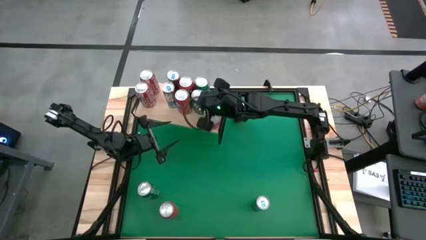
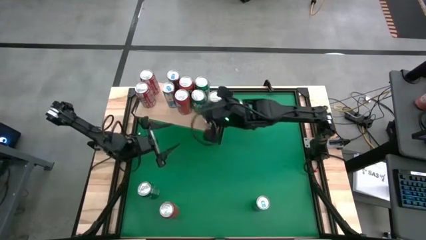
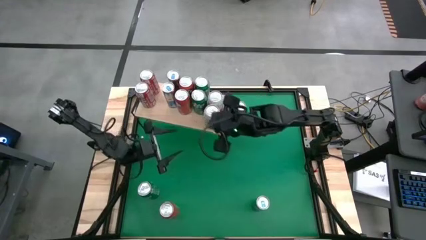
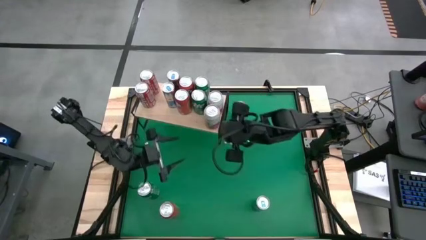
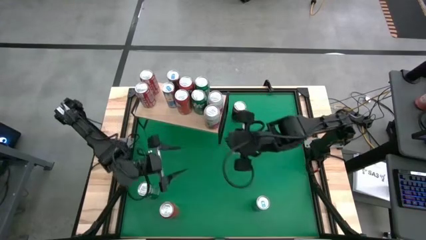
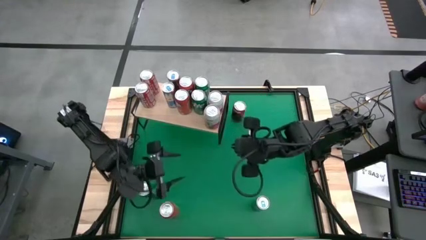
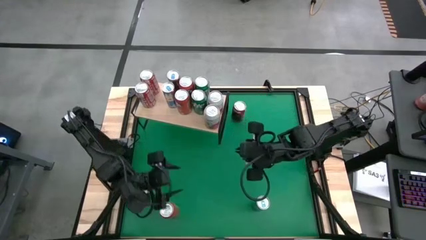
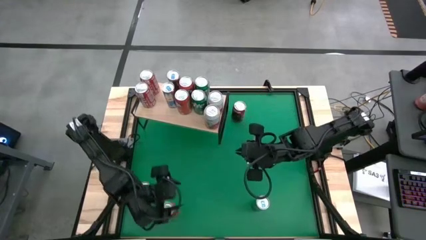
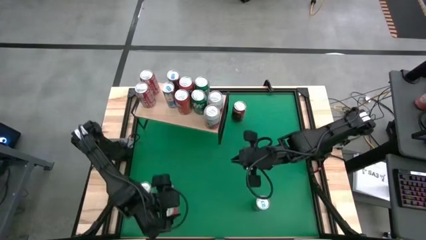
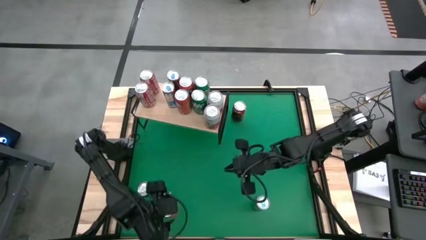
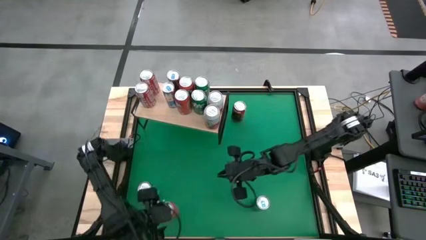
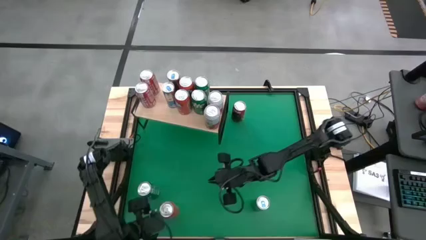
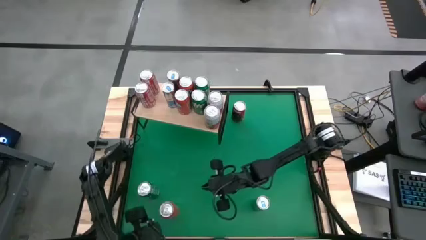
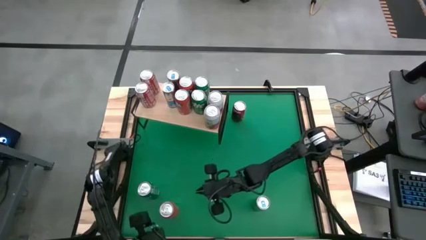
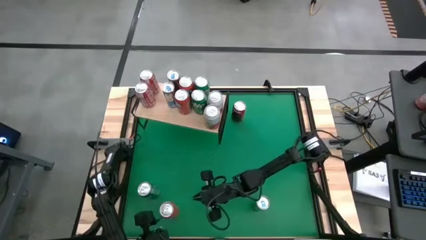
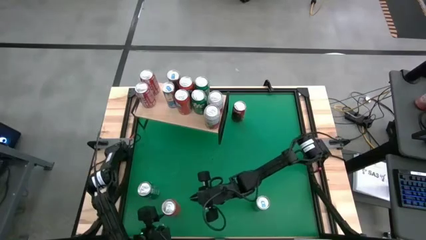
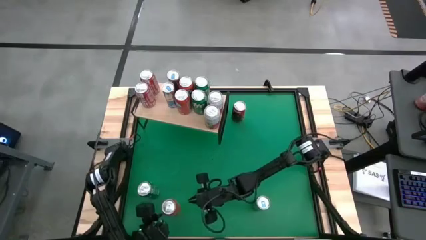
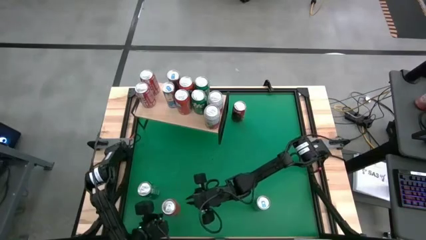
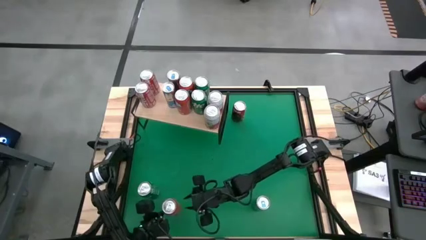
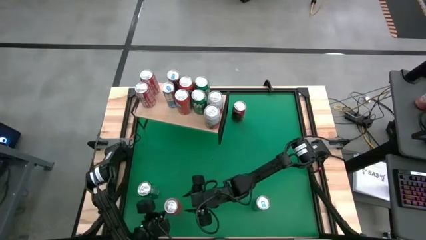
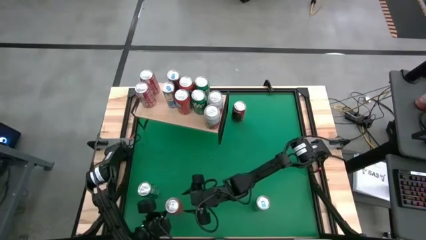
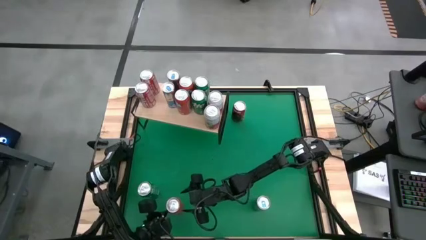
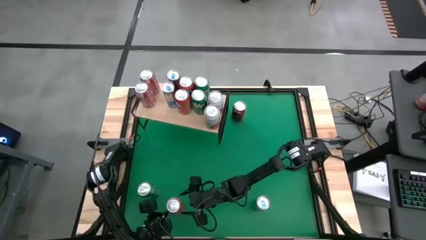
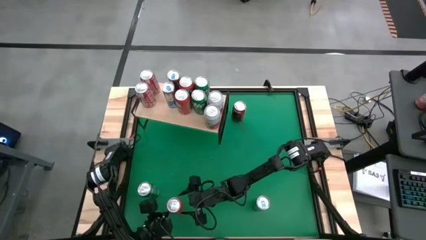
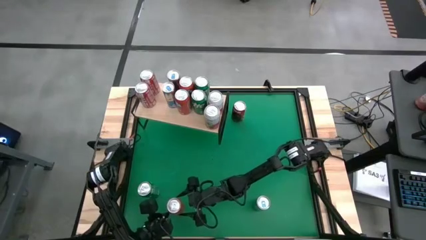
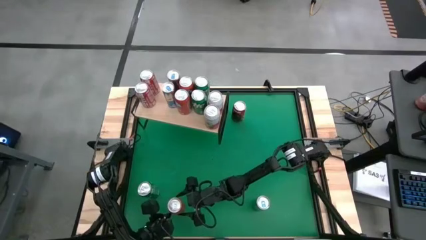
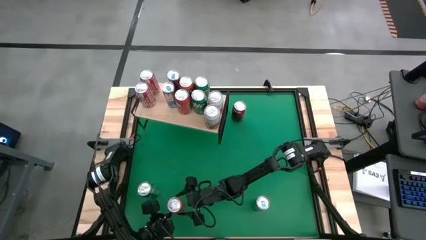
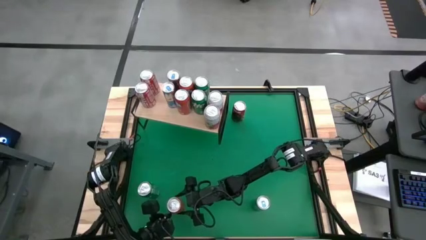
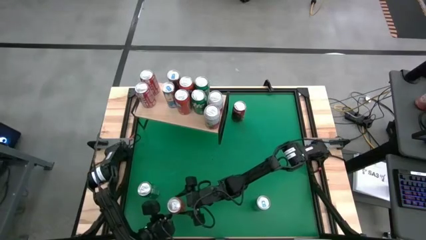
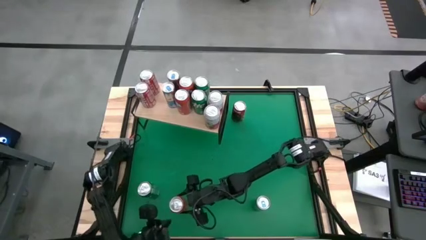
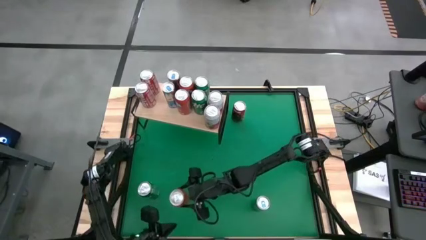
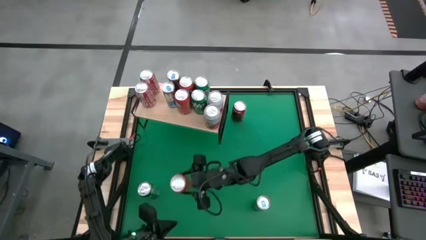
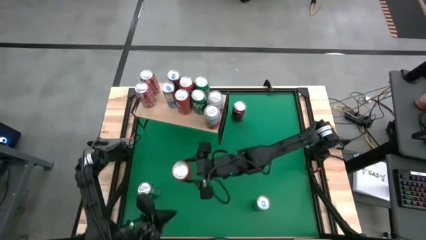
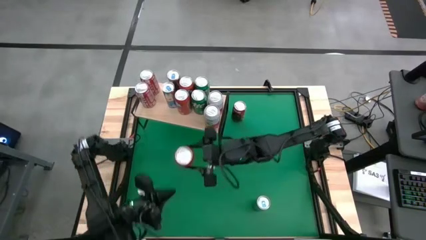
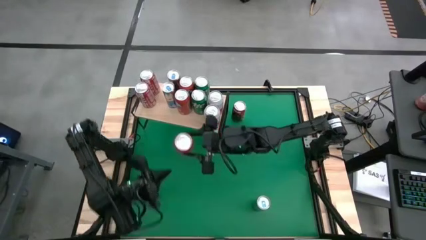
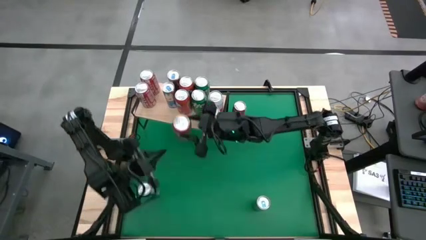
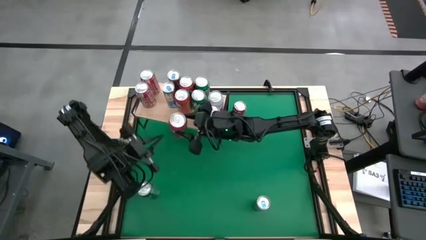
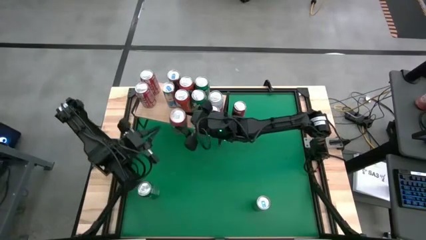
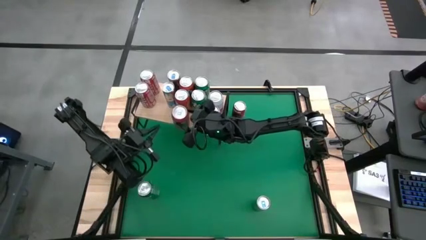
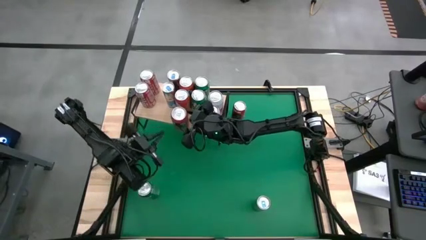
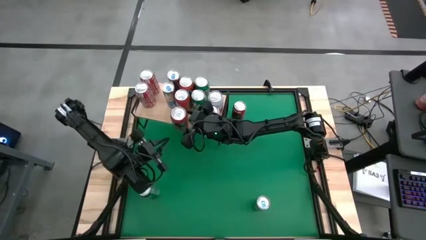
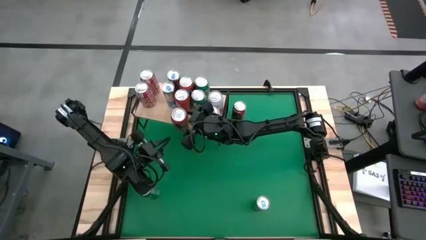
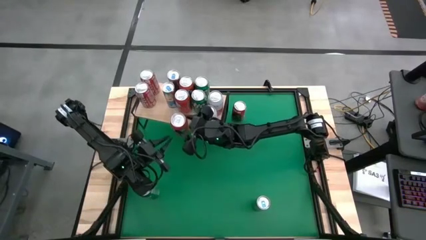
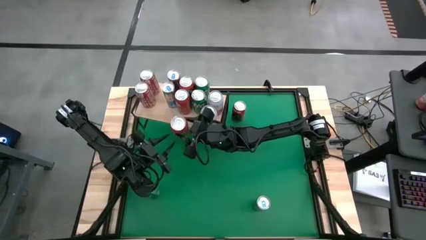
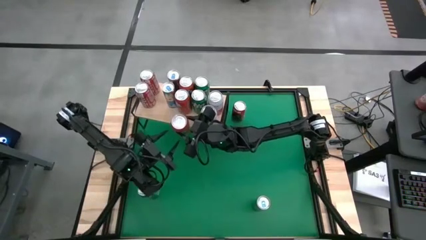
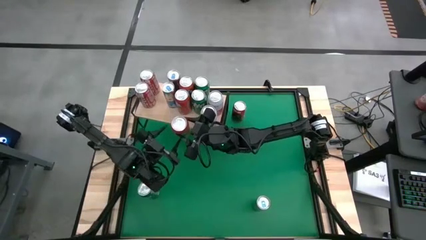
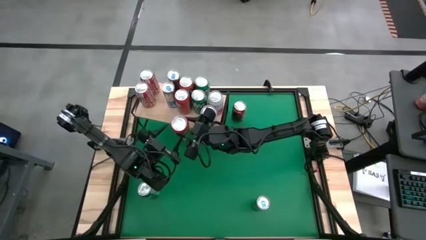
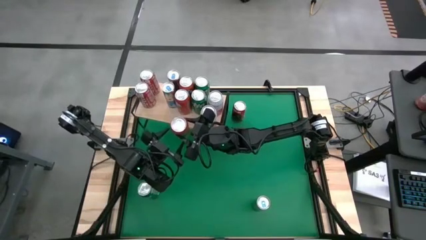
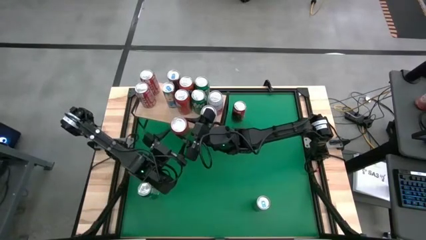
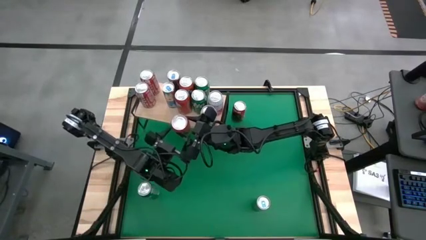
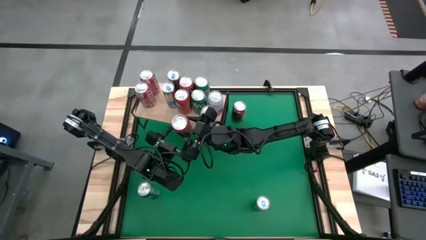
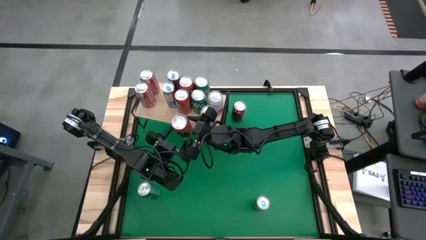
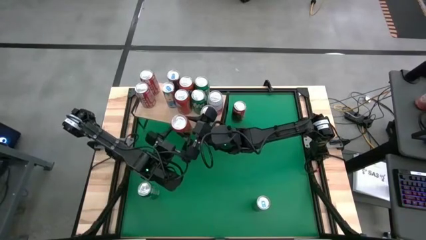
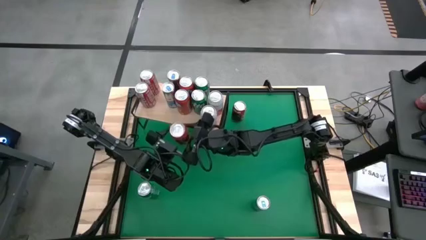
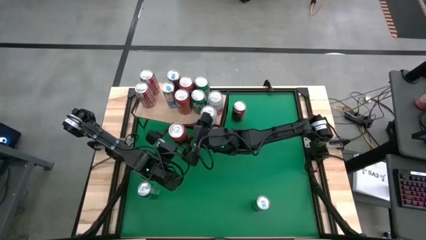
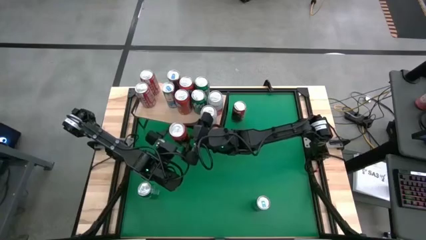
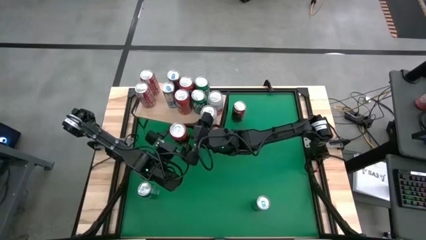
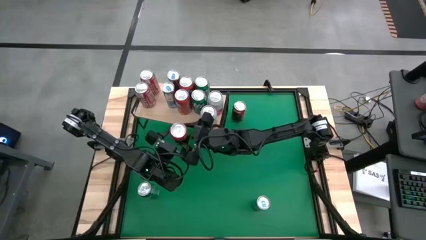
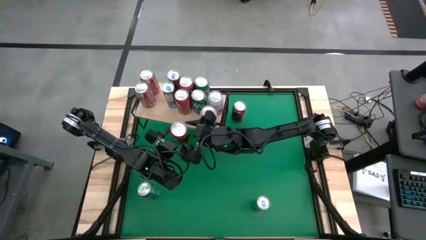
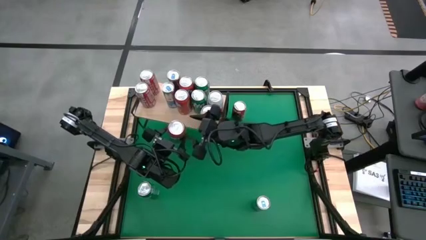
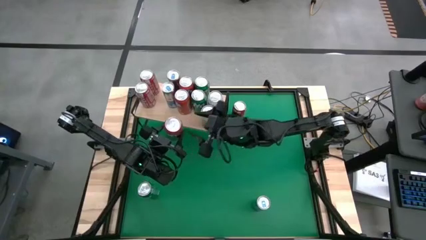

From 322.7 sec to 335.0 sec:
Task: Place canned beverage on shelf
Put the red soda can on the shelf aligned with the other red soda can

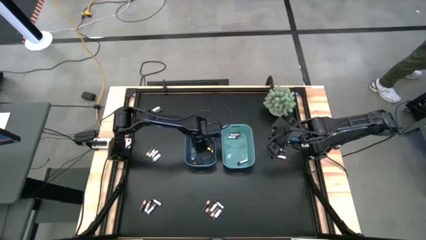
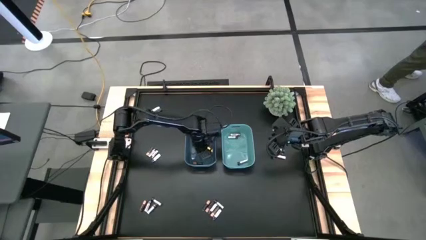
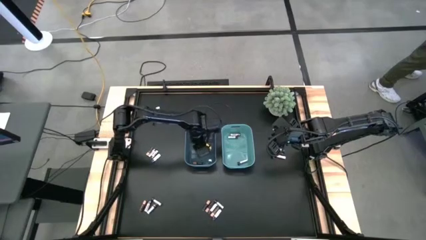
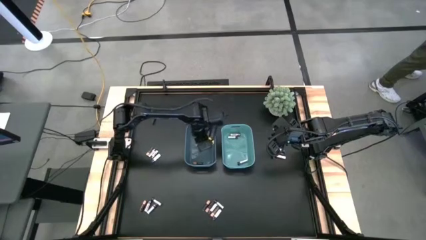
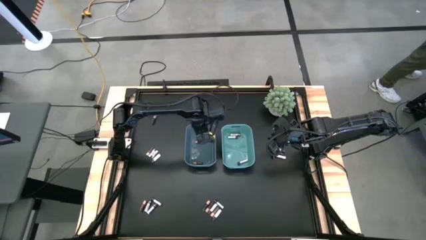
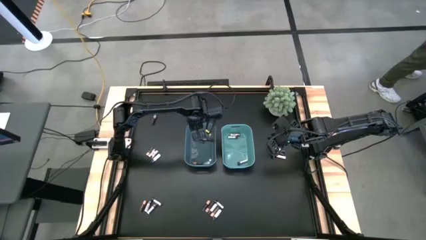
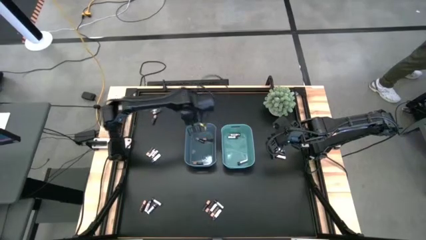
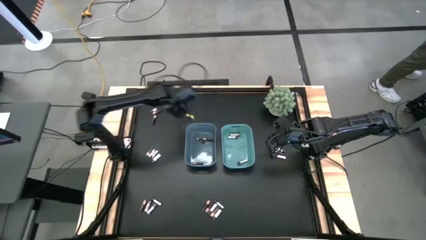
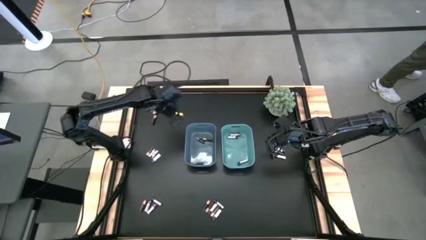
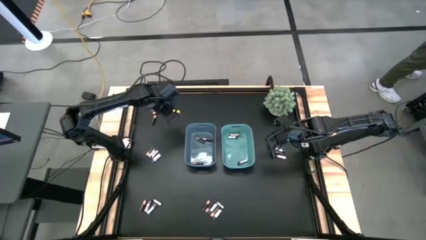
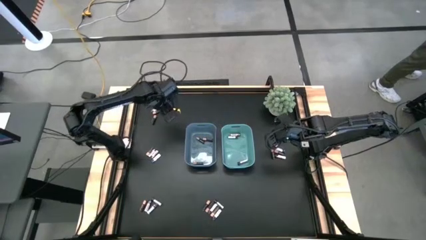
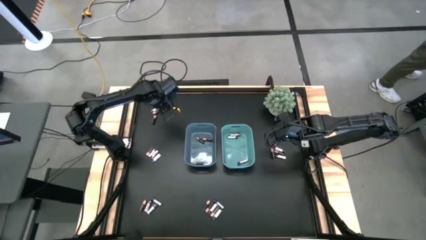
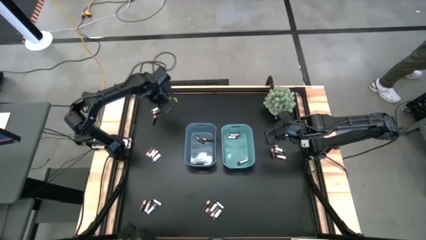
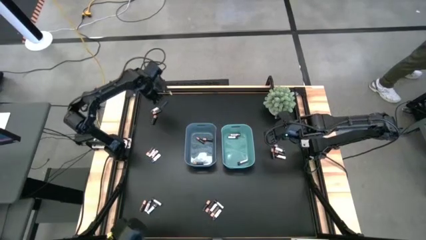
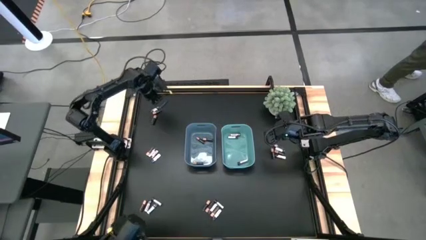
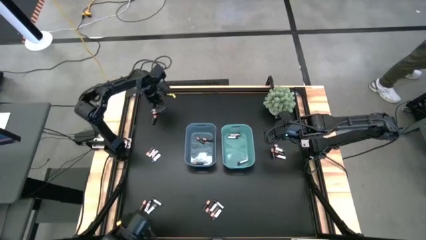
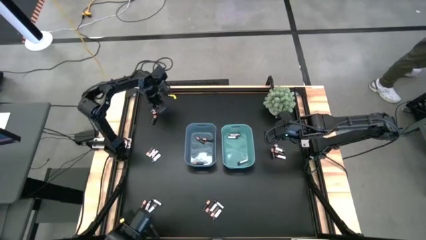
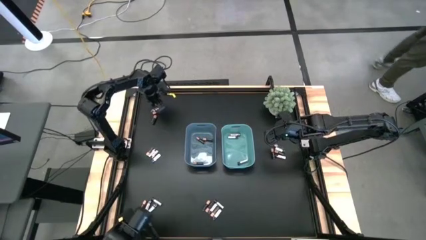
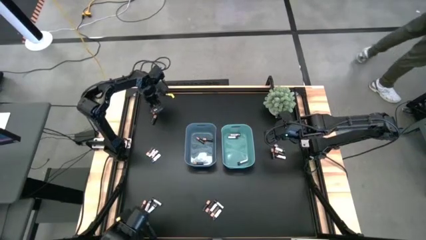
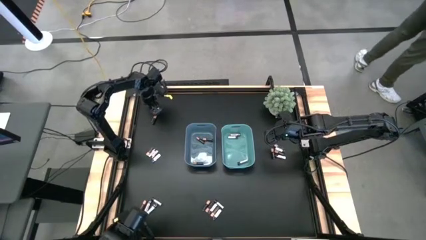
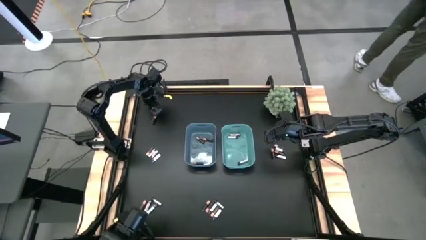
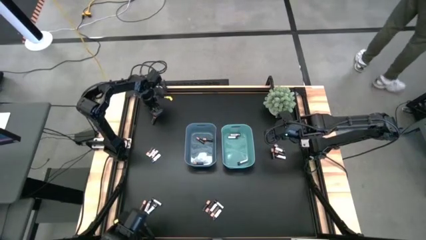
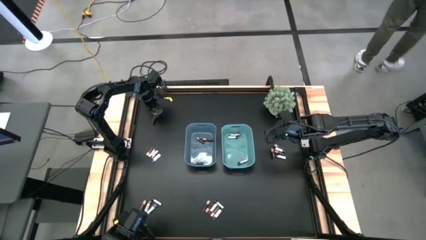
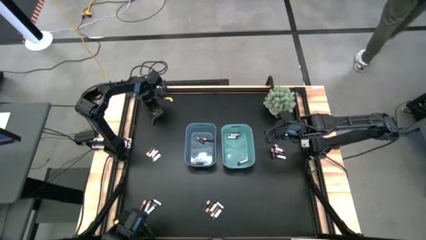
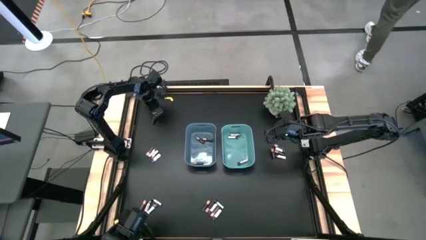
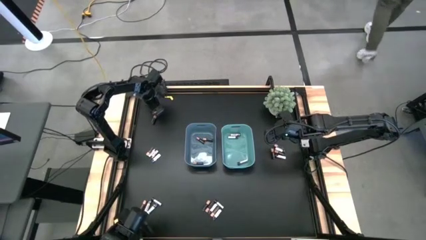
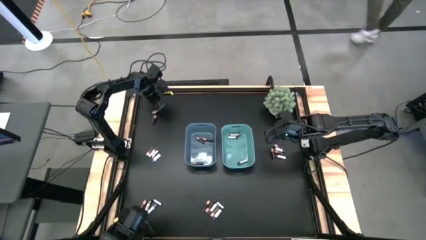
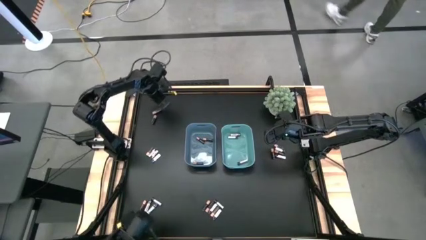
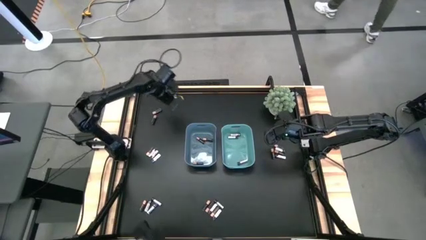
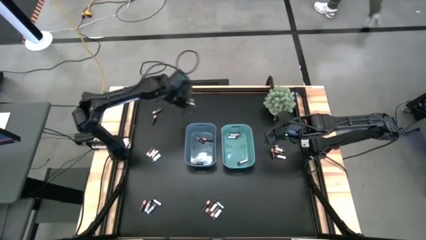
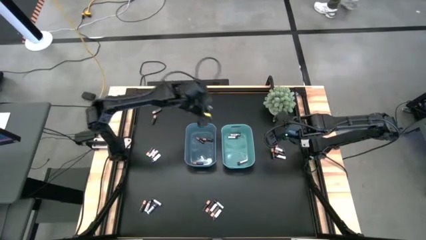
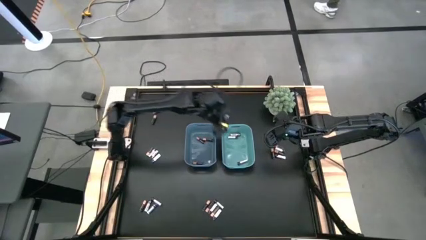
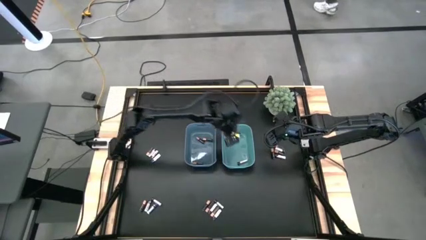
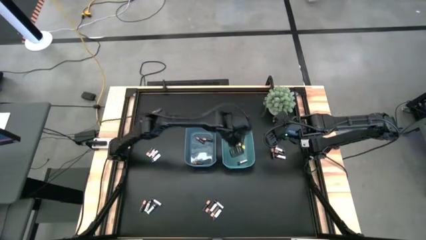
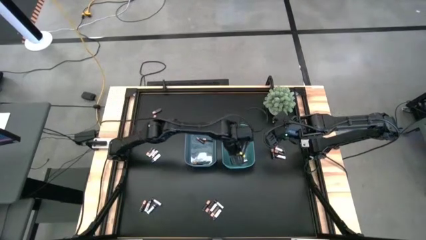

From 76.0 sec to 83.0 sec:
Task: Sort batteries
Put the white battery into the green bin
